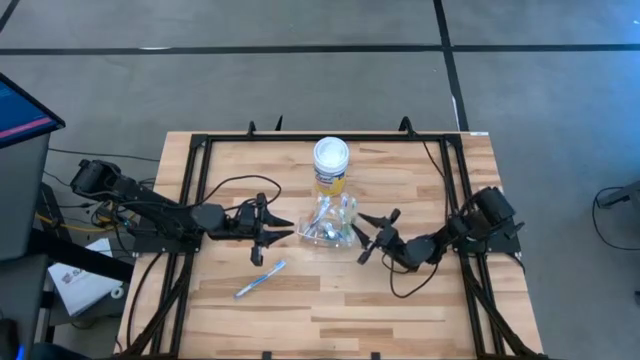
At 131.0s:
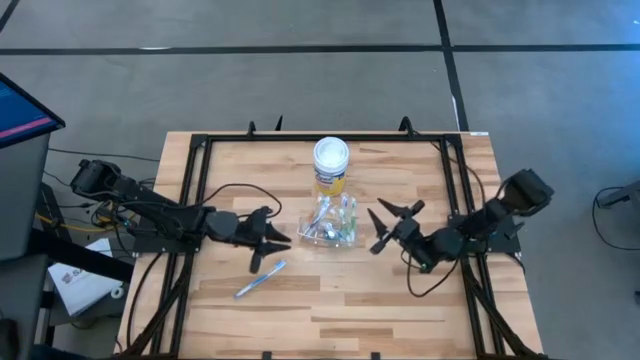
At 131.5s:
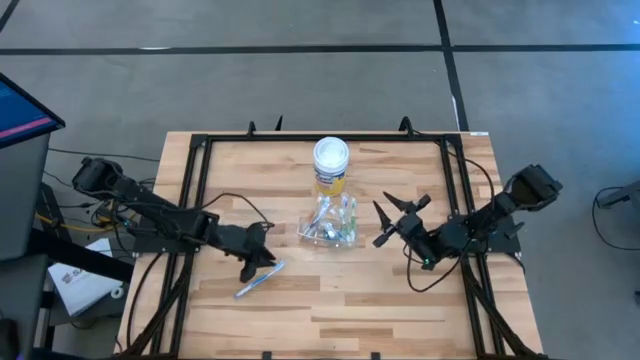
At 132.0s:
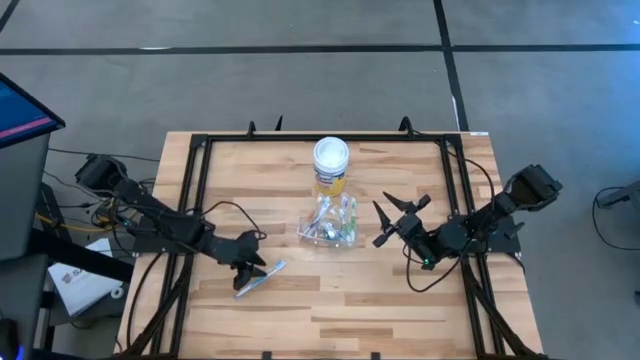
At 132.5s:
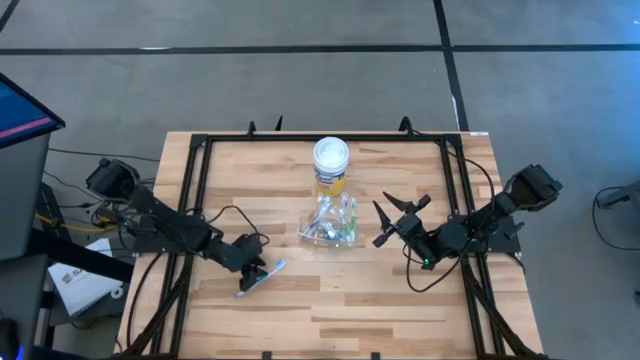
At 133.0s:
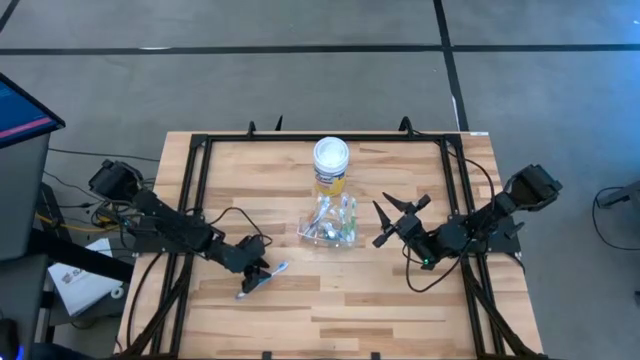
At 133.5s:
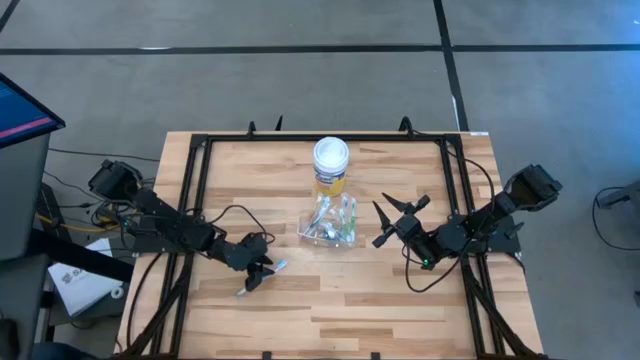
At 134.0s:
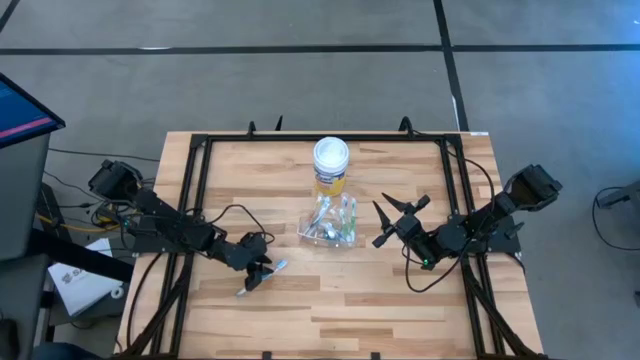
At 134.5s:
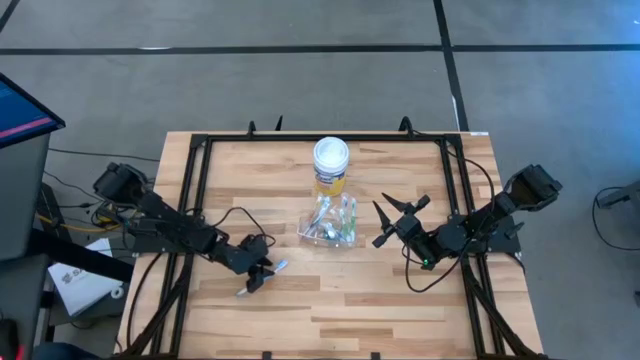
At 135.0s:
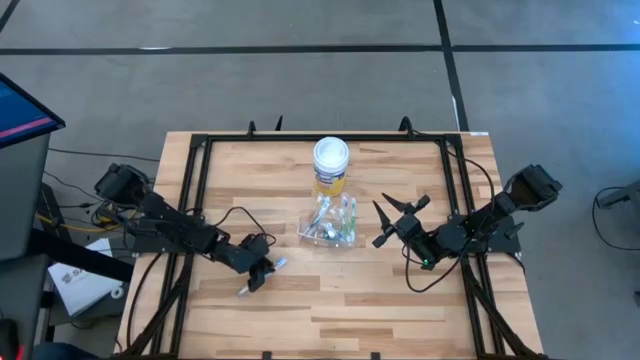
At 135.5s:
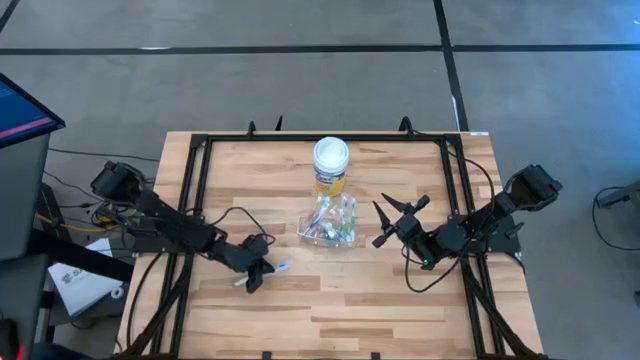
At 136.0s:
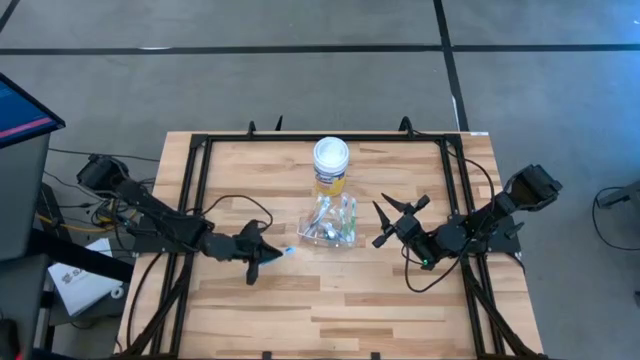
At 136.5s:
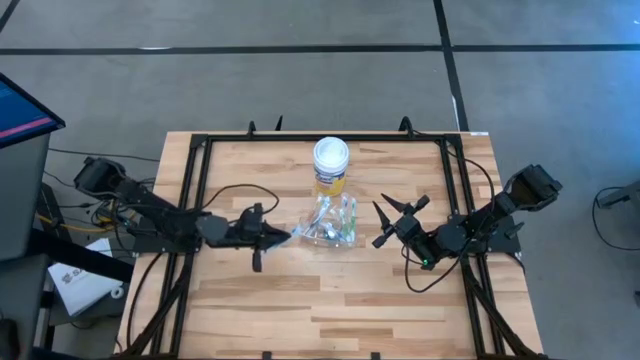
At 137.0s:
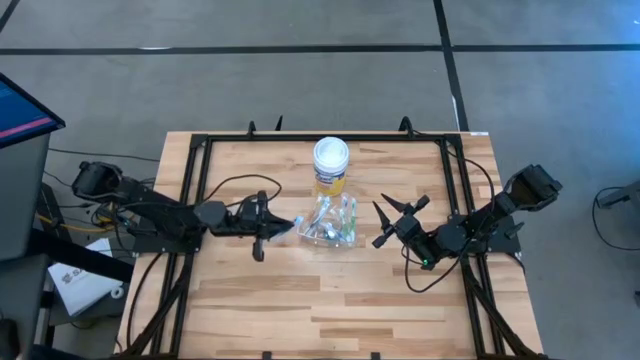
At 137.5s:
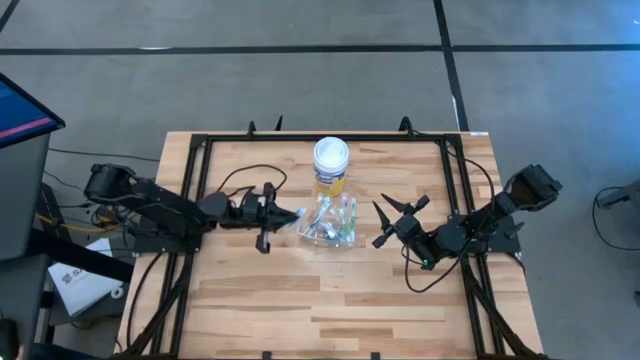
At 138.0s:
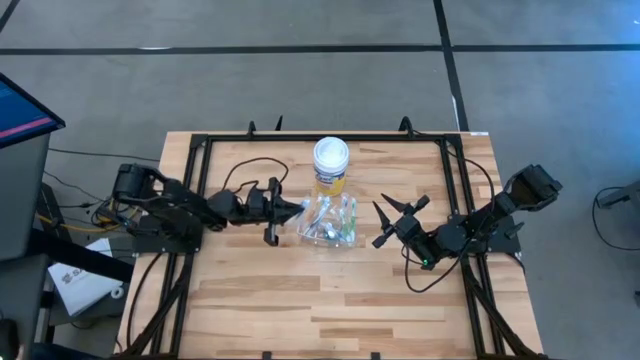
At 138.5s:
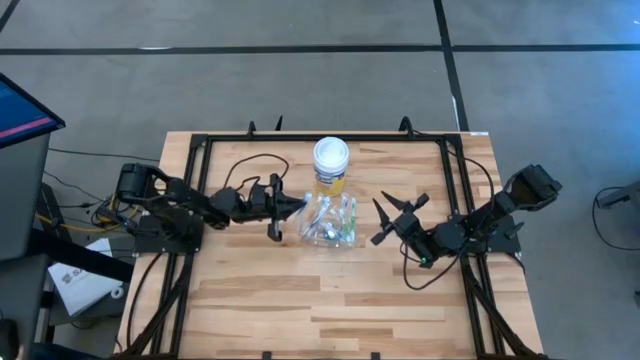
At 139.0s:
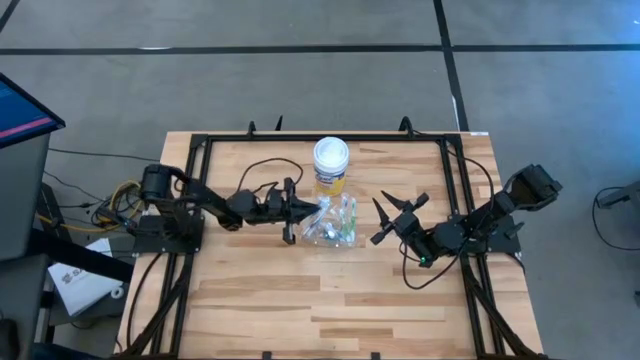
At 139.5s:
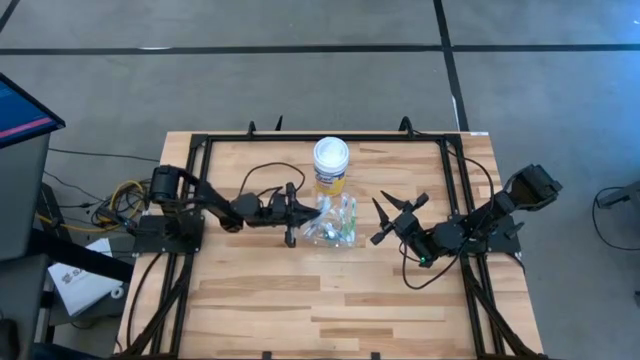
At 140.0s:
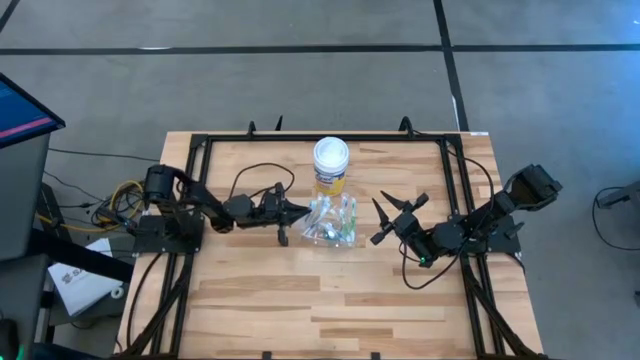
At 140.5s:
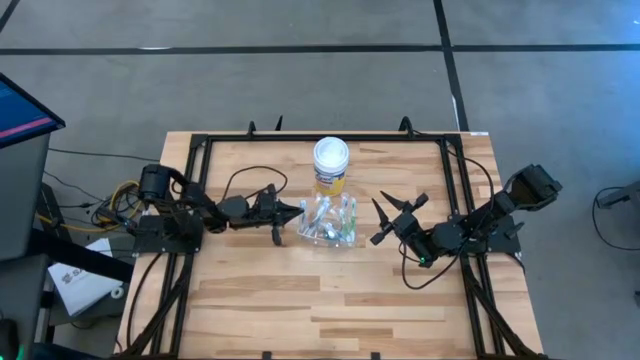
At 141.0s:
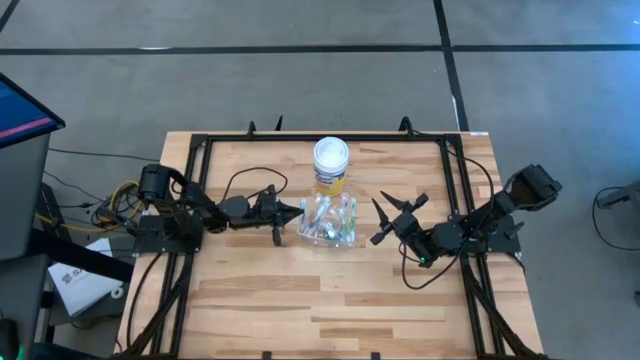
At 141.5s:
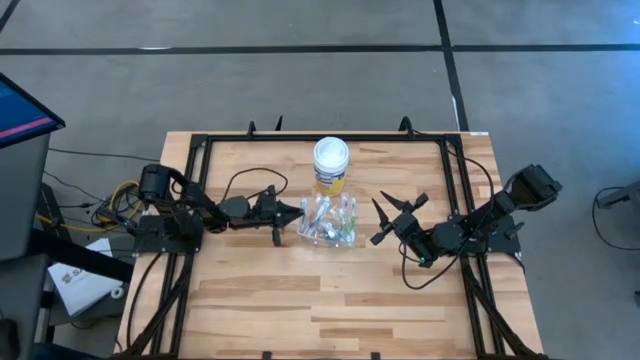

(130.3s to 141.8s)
Task: Pick & Place toothbrushing station
Put the blue toothbrush into the transparent organizer

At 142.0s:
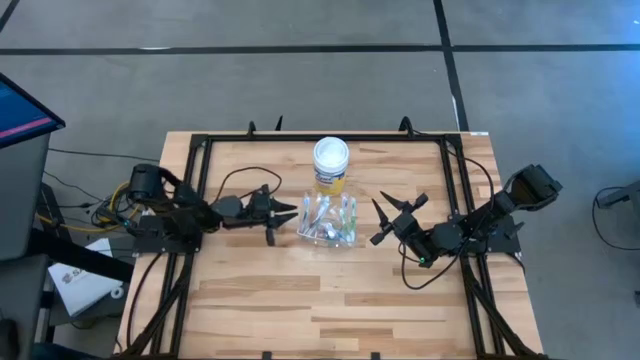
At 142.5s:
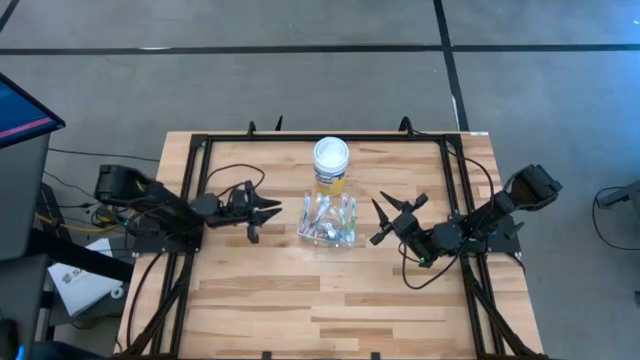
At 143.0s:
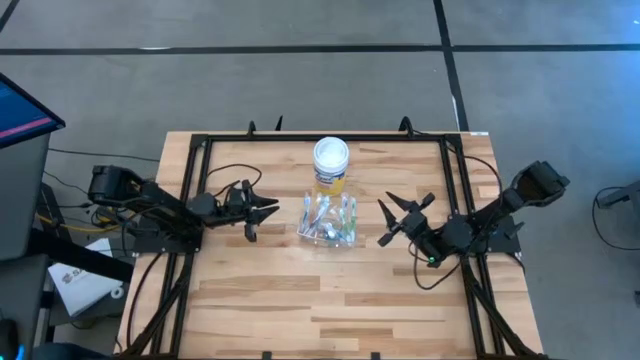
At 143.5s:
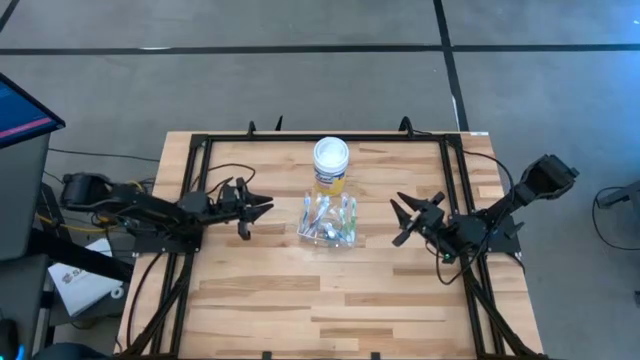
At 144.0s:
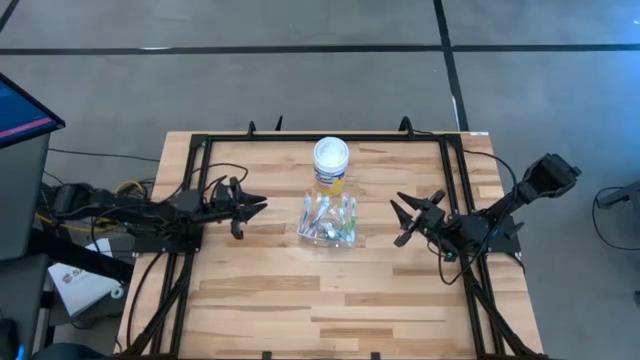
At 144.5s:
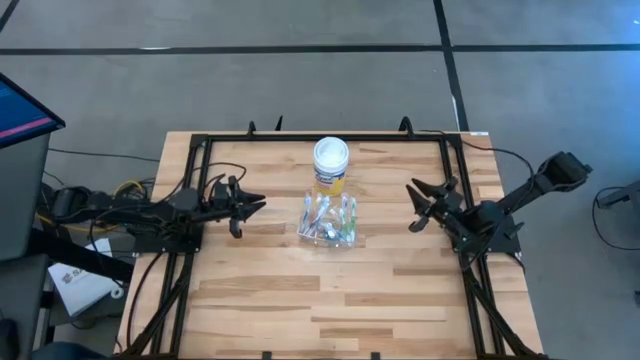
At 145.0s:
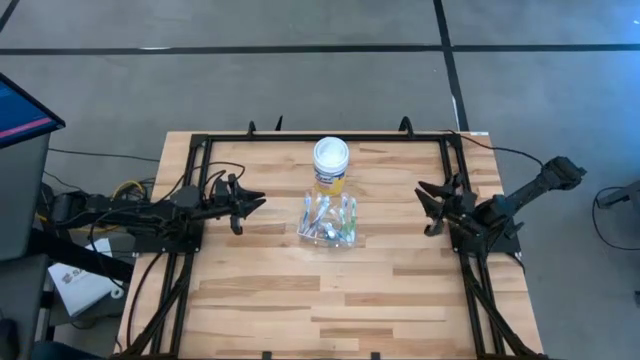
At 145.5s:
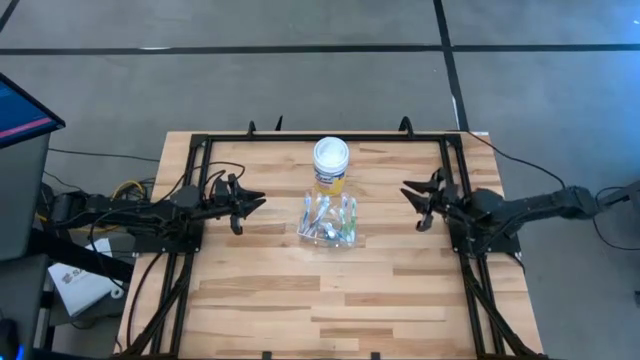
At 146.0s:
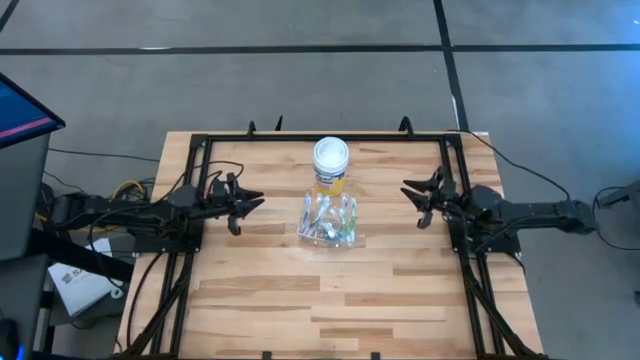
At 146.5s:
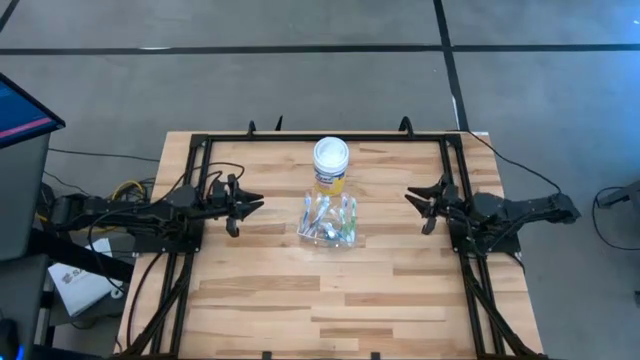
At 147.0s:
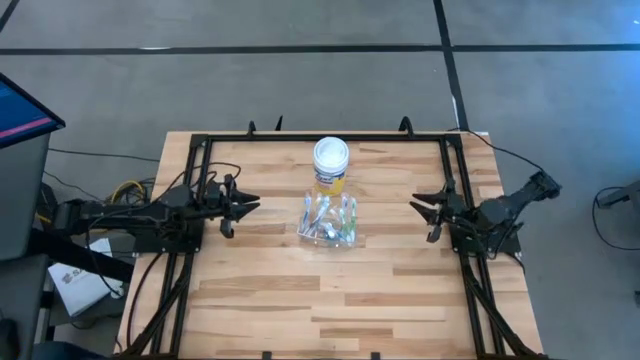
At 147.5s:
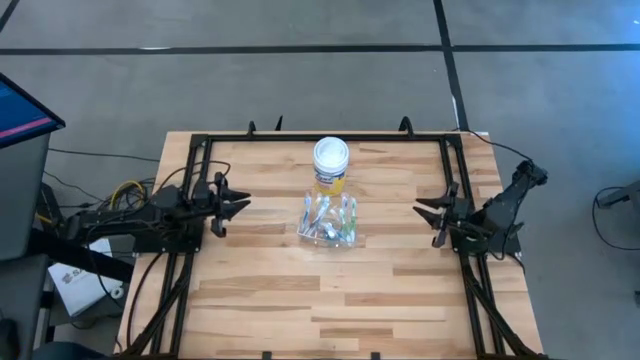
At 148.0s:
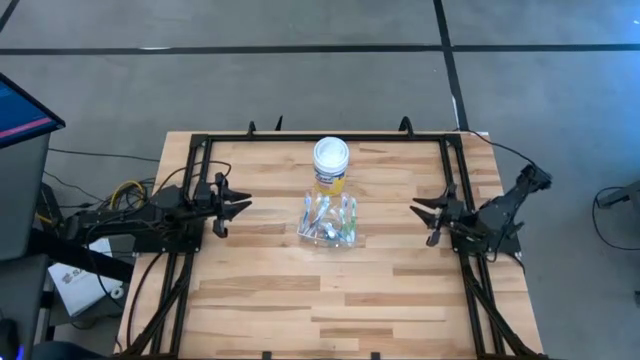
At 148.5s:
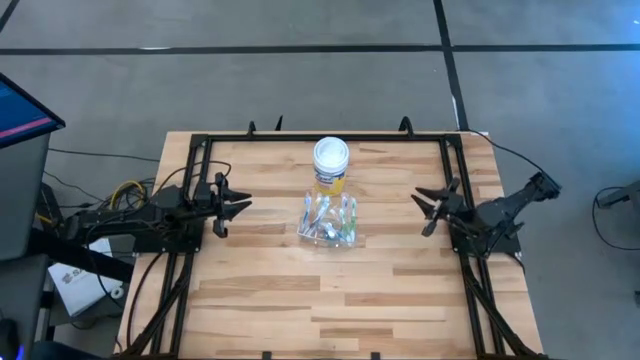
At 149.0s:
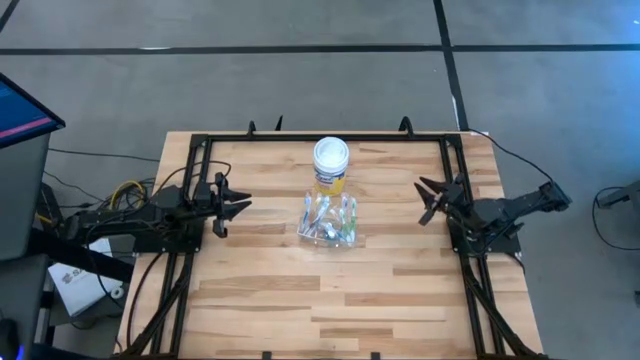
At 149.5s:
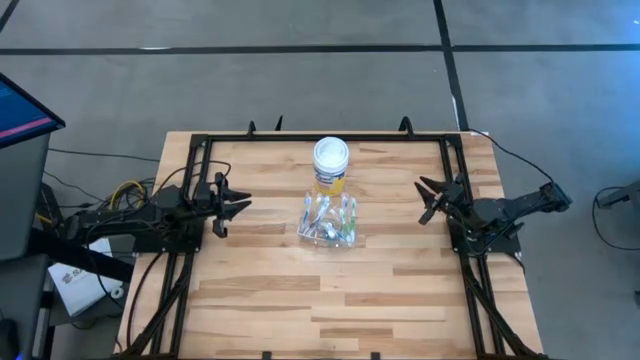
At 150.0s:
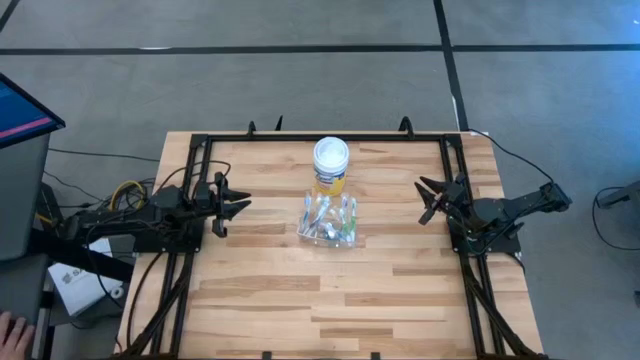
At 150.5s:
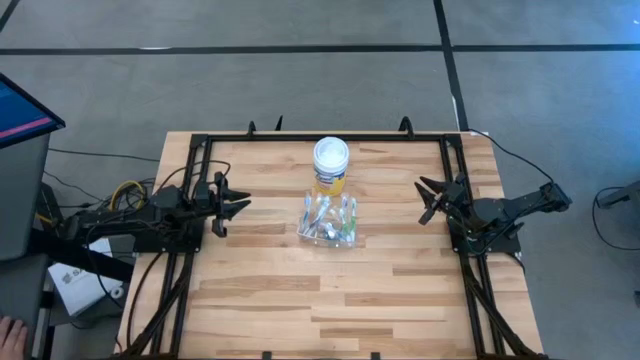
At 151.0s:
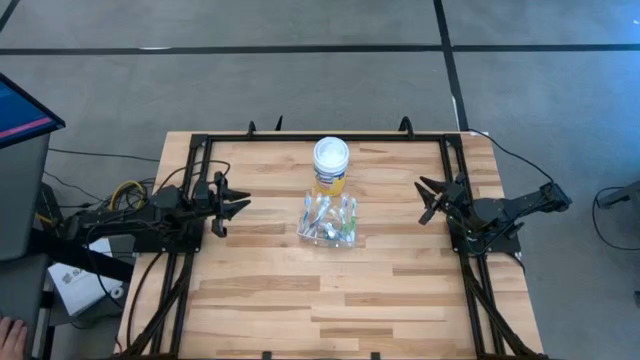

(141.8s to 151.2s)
Return to Home Position
